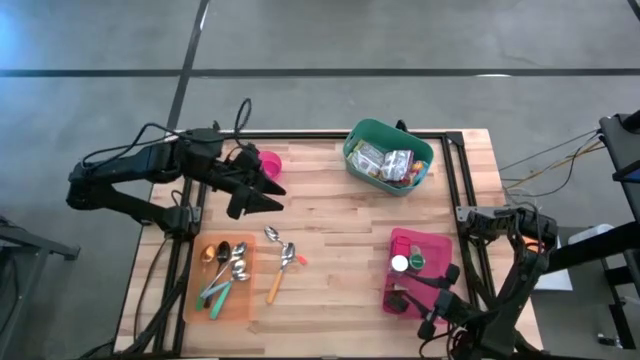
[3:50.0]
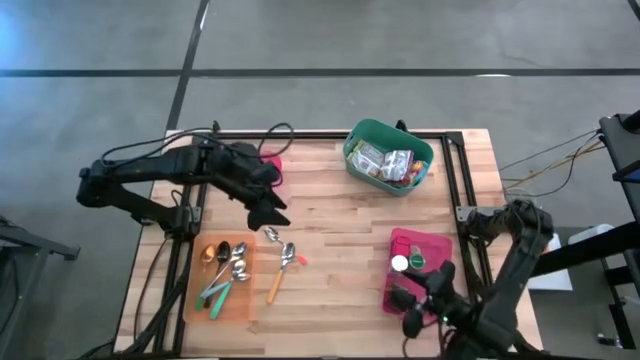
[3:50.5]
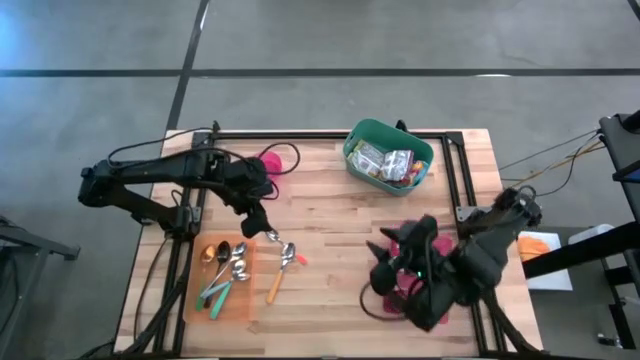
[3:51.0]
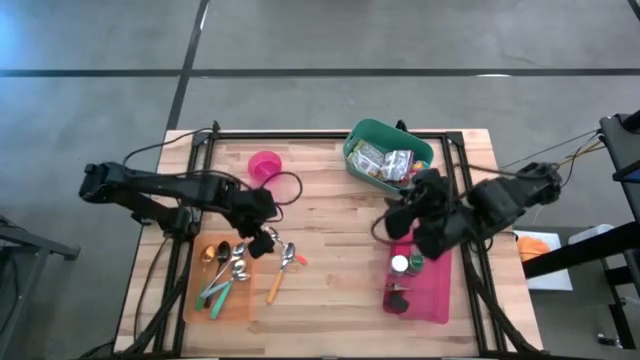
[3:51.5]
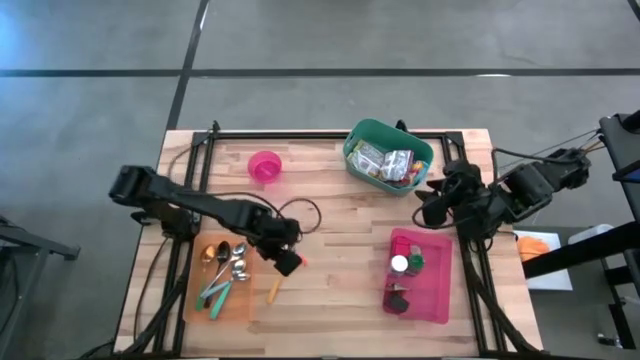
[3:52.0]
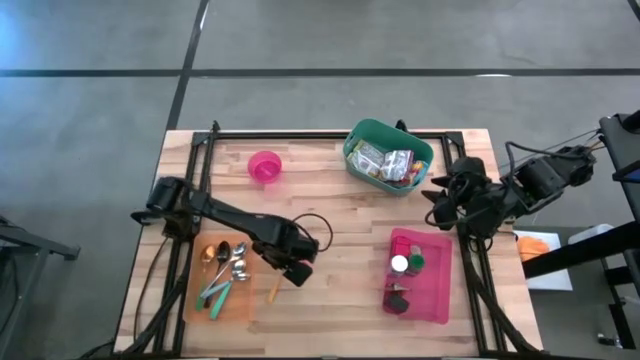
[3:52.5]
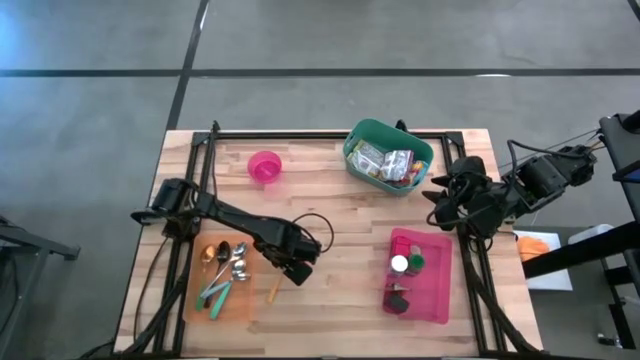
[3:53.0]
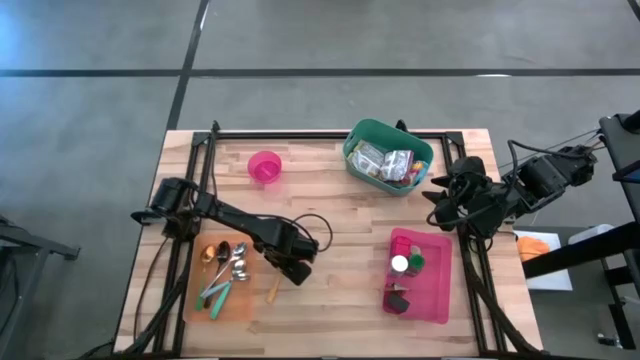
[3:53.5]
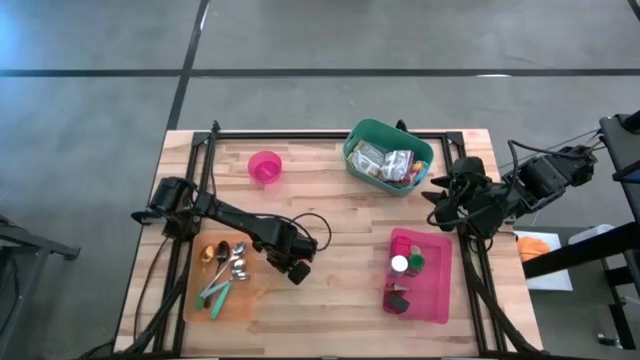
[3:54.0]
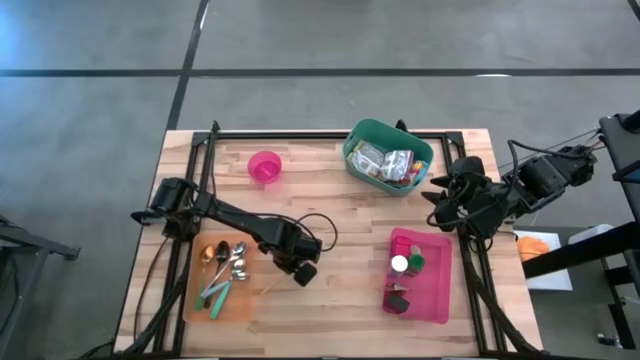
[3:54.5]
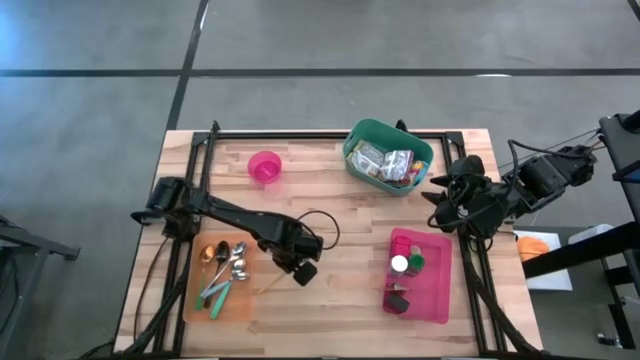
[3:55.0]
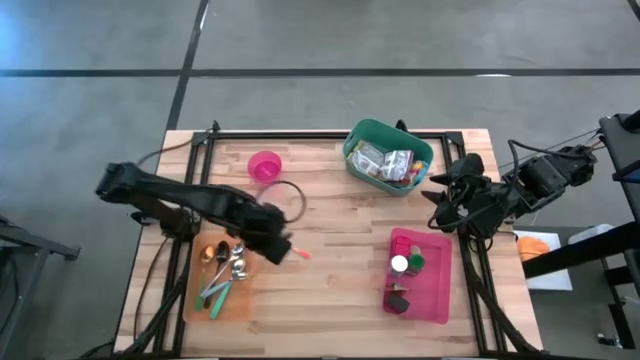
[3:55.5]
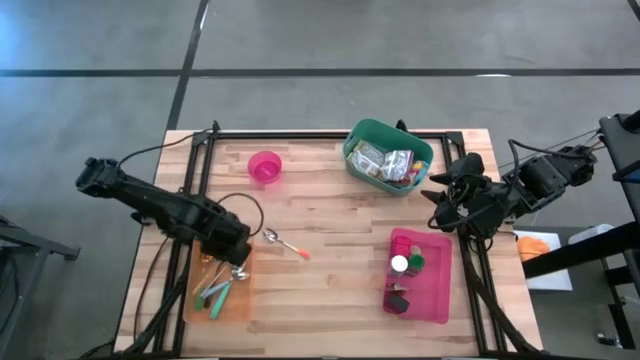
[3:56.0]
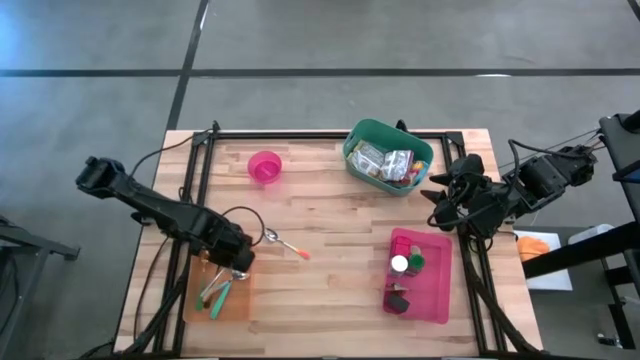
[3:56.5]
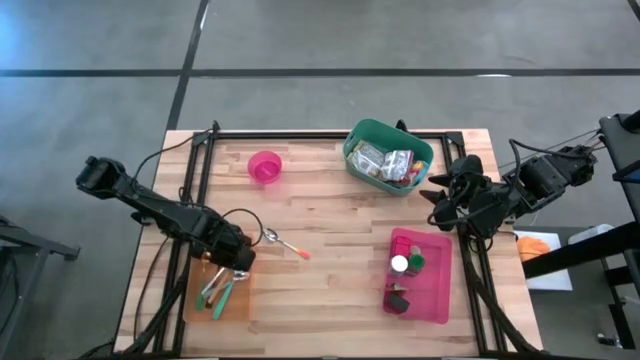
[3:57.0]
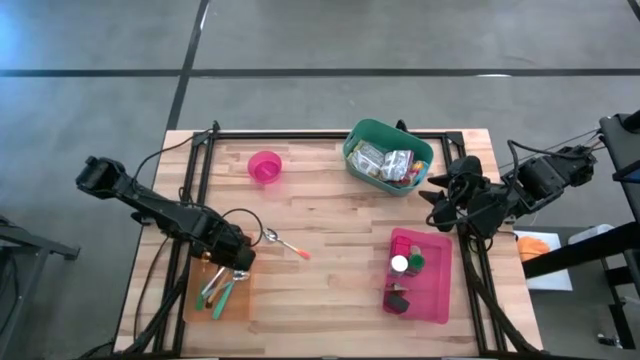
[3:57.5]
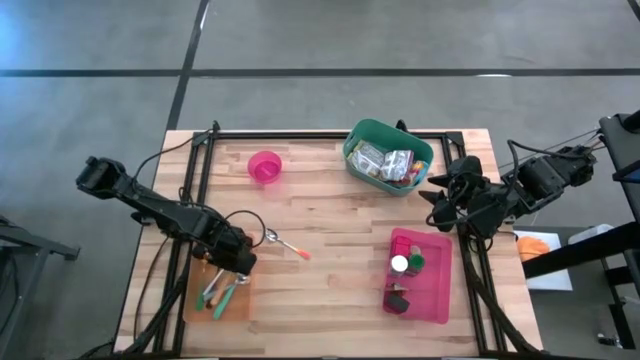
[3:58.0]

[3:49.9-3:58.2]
Task: Pick & Place Food Item
Put the yellow spoon into the orange bin

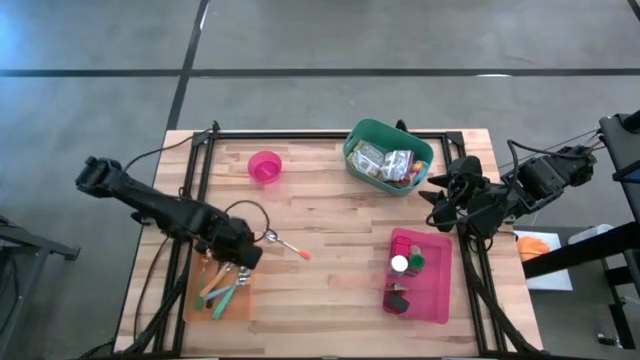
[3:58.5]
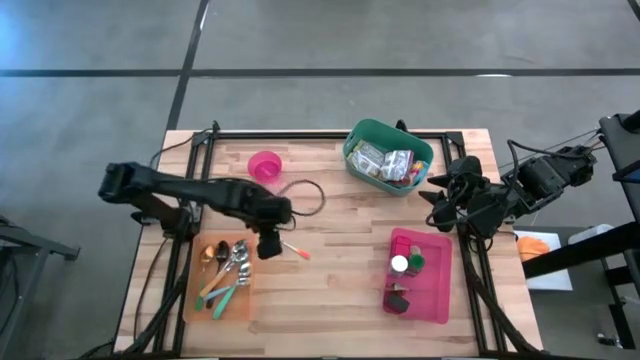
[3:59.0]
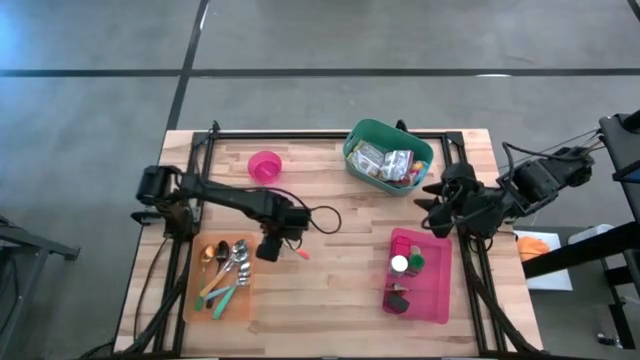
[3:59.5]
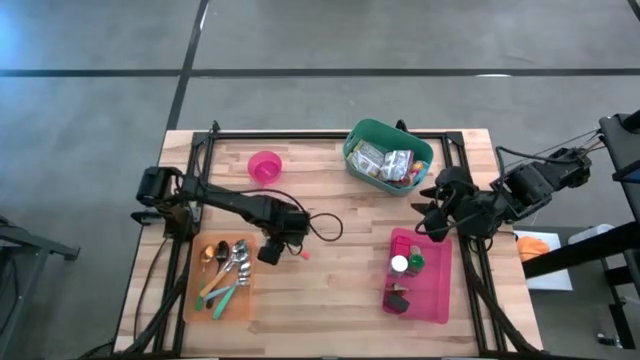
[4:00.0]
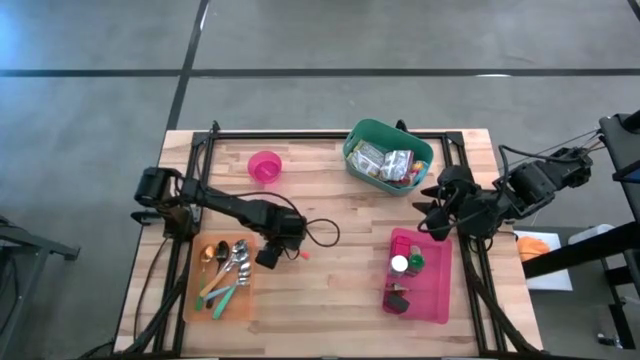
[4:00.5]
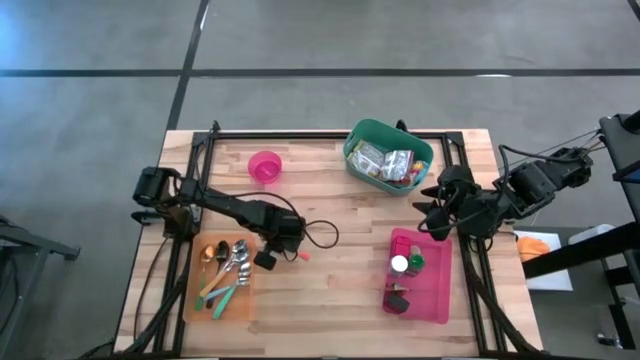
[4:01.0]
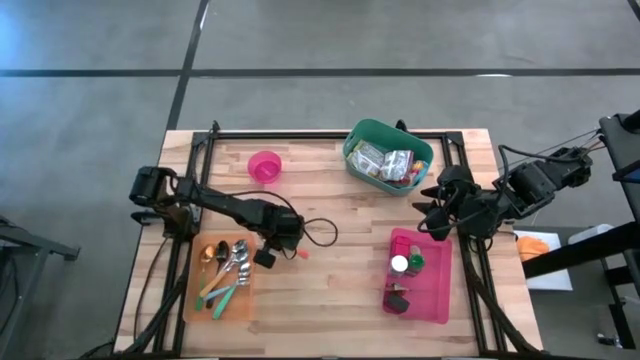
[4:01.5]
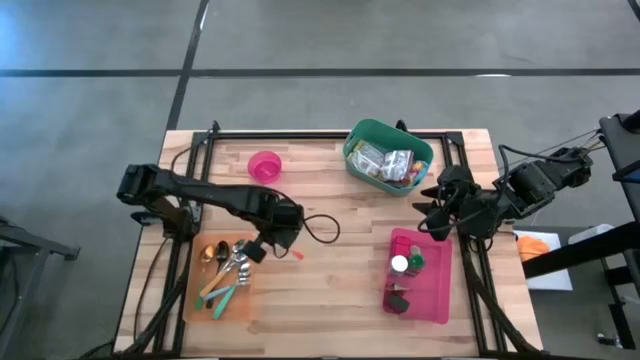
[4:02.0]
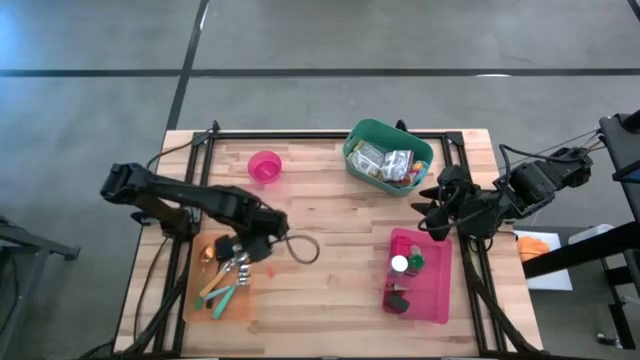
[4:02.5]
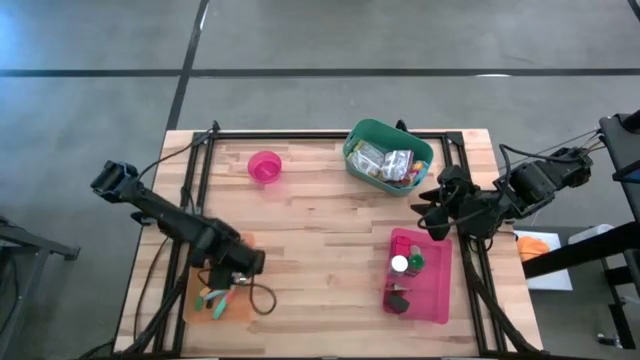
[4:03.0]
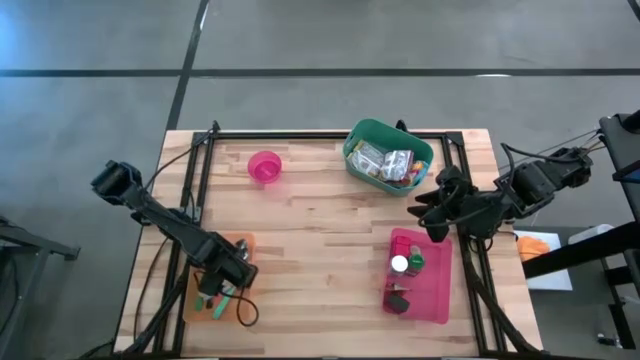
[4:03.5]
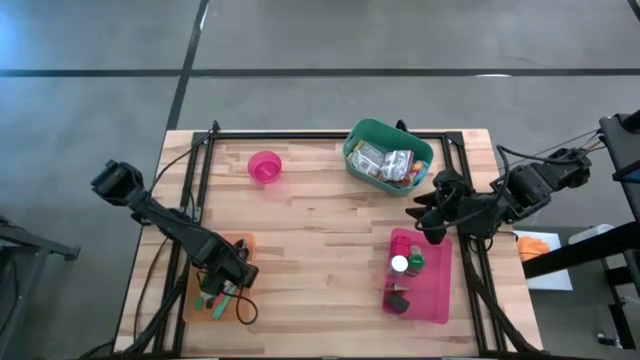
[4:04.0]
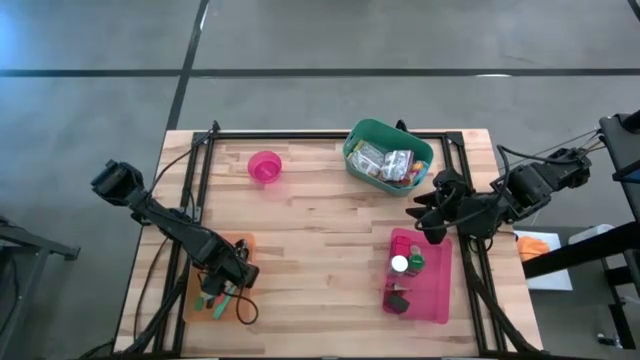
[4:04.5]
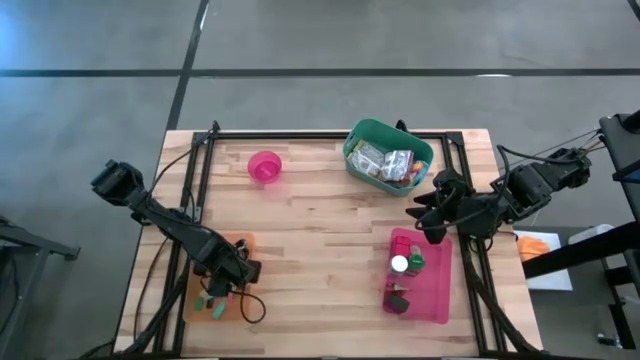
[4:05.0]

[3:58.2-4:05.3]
Put the orange spoon into the orange bin

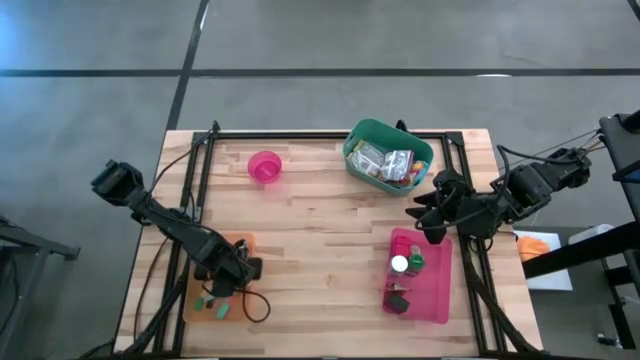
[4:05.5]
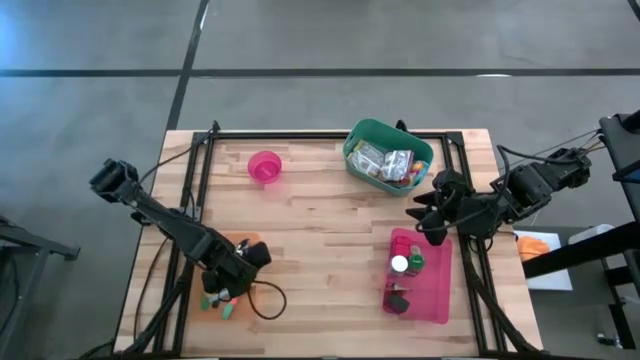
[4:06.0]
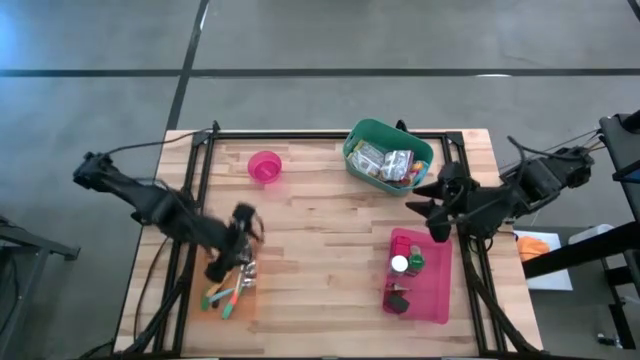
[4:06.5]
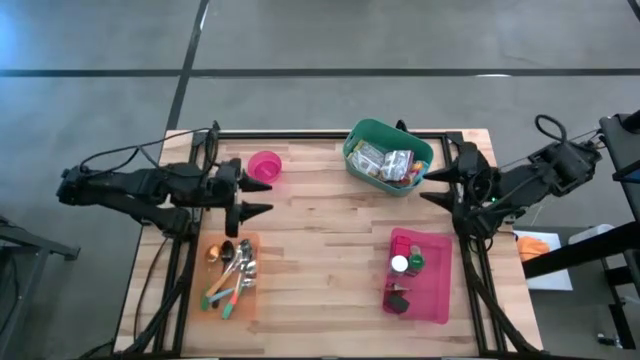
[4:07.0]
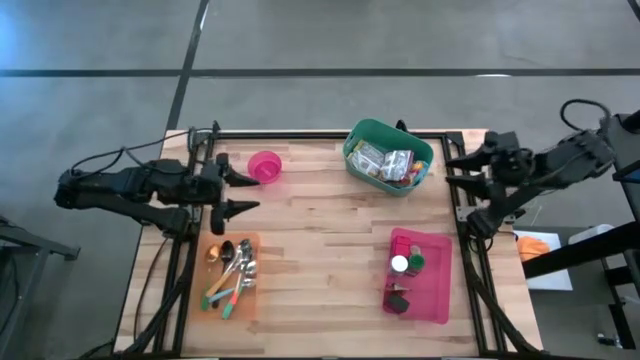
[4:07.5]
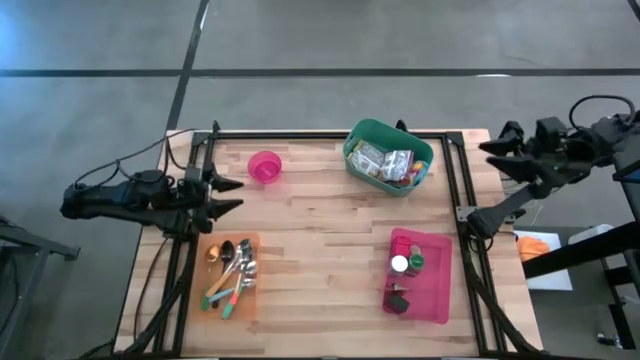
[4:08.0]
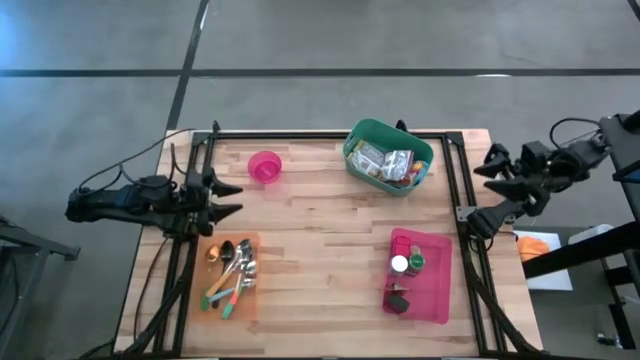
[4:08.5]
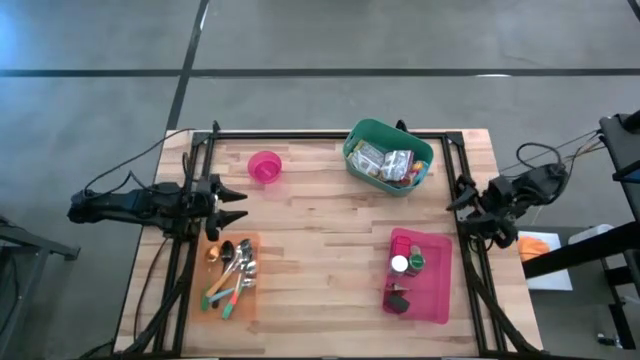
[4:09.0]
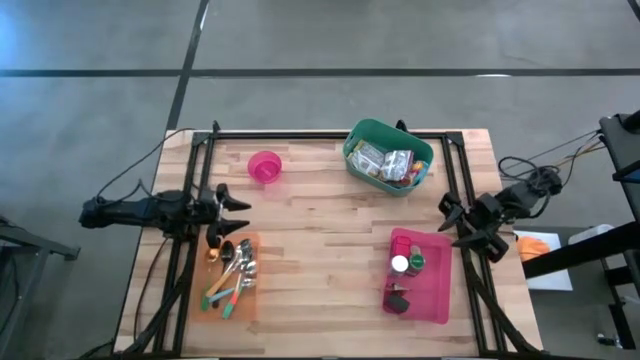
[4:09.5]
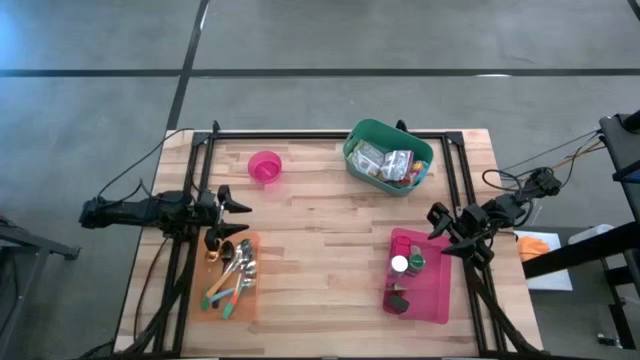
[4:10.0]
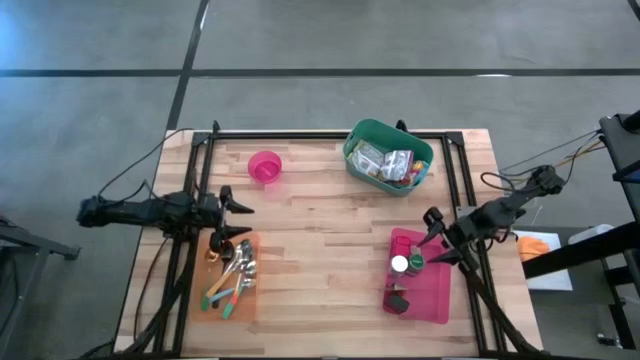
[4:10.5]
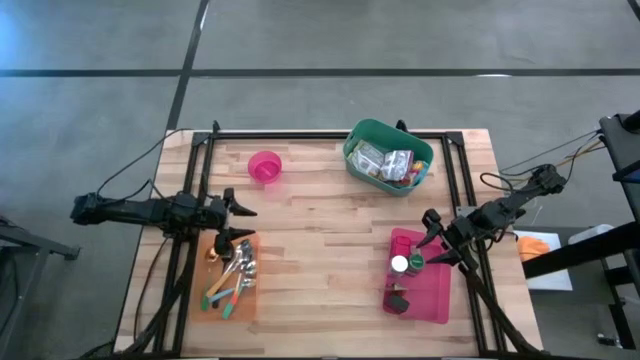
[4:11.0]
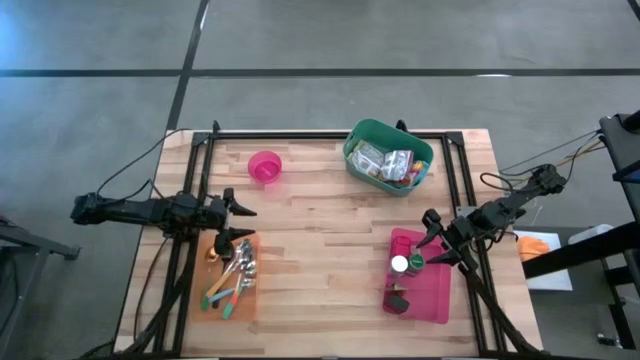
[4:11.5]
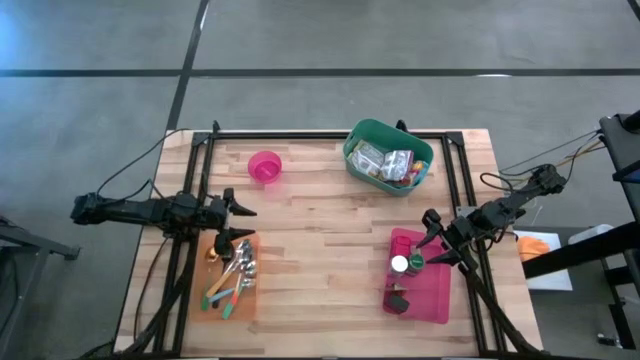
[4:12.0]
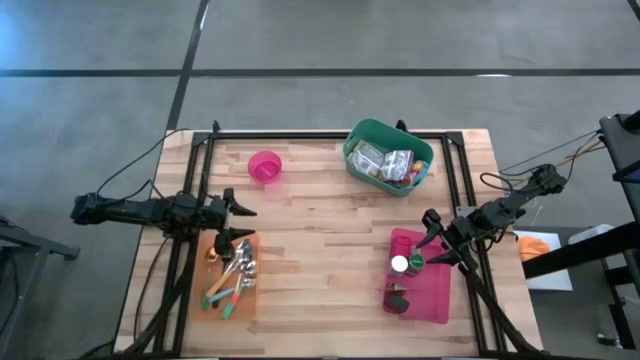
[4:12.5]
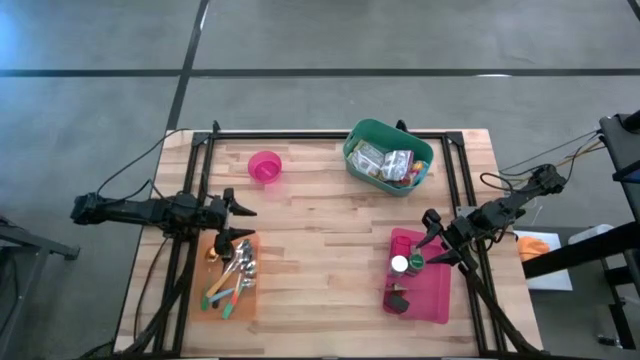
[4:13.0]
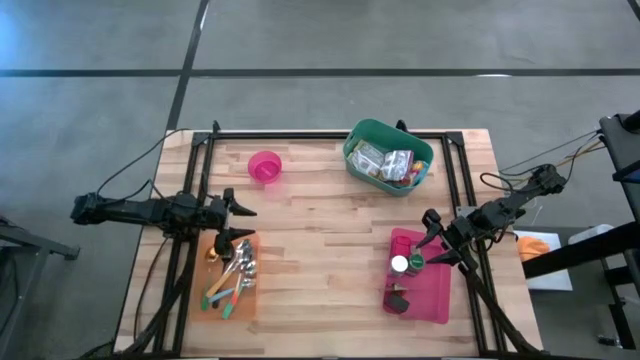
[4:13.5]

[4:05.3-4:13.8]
Return to Home Position
